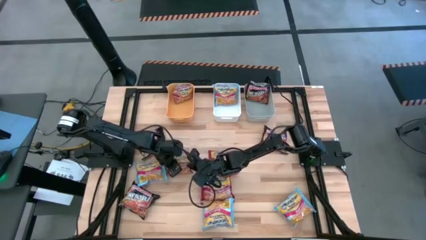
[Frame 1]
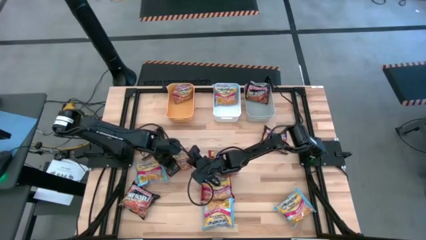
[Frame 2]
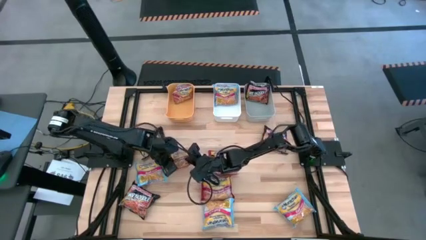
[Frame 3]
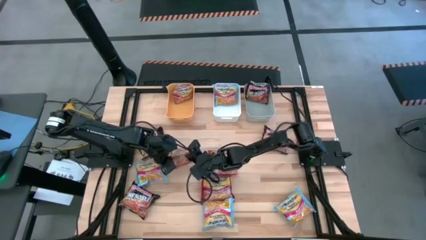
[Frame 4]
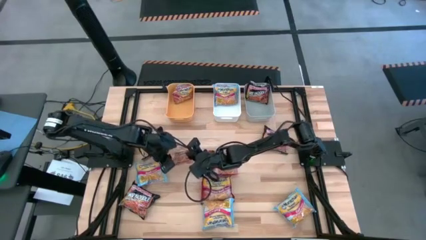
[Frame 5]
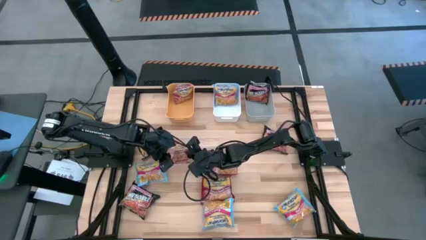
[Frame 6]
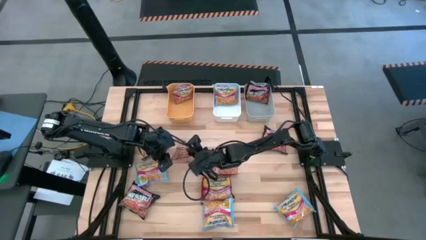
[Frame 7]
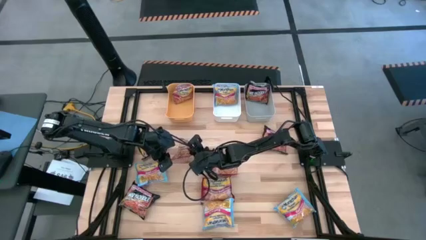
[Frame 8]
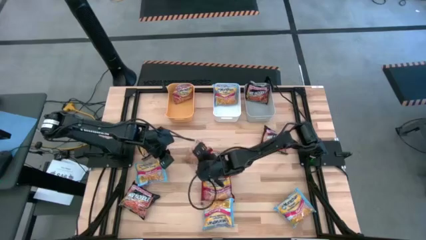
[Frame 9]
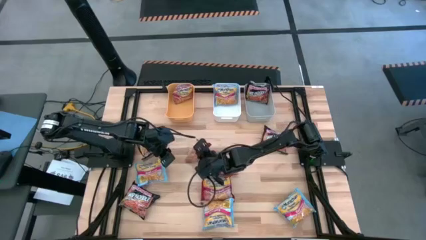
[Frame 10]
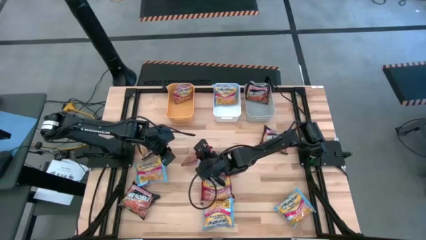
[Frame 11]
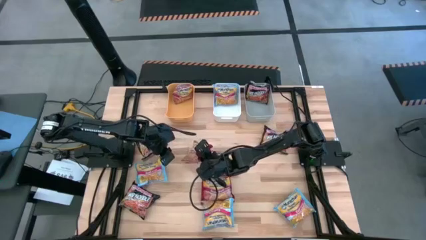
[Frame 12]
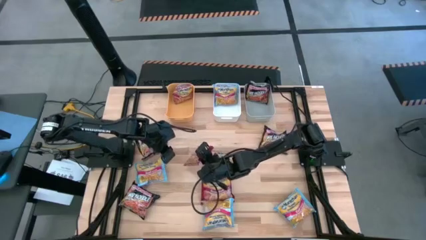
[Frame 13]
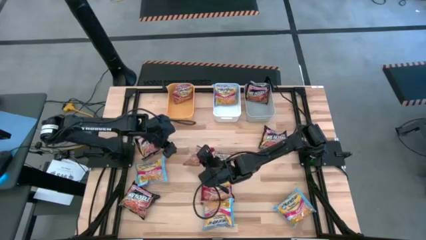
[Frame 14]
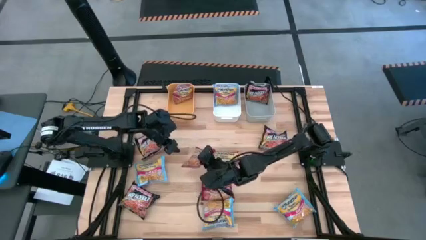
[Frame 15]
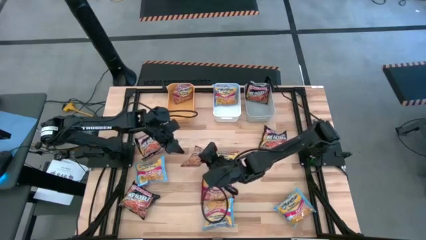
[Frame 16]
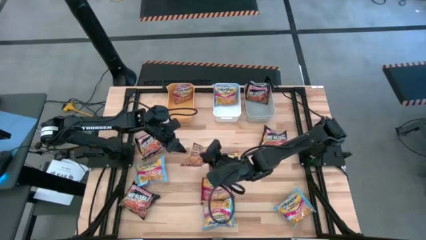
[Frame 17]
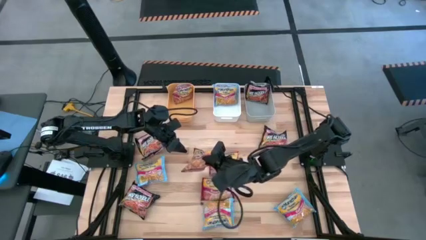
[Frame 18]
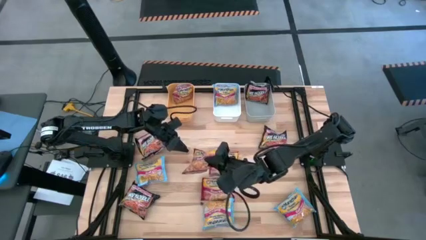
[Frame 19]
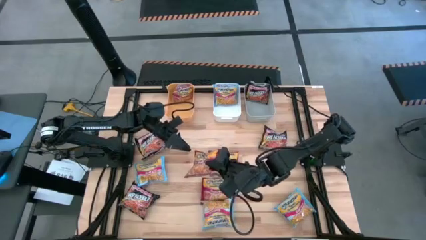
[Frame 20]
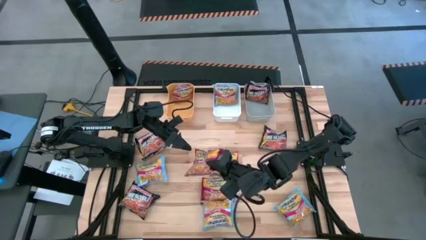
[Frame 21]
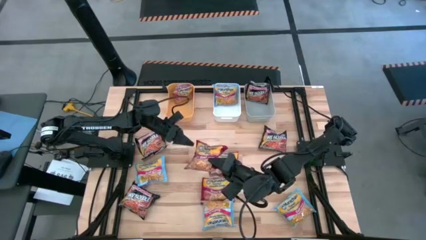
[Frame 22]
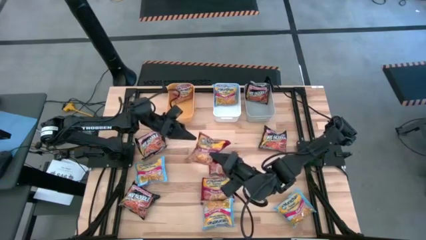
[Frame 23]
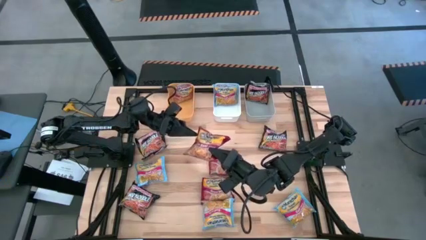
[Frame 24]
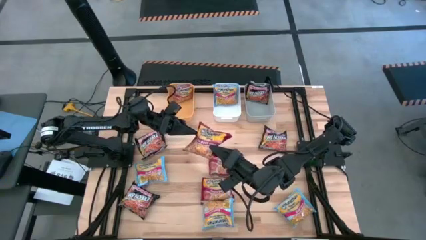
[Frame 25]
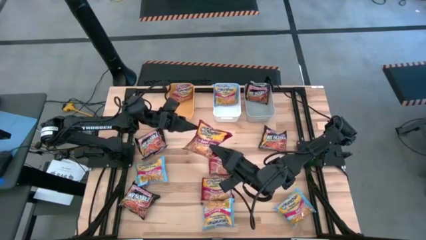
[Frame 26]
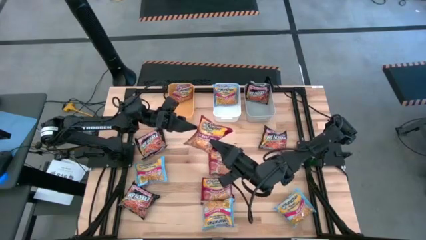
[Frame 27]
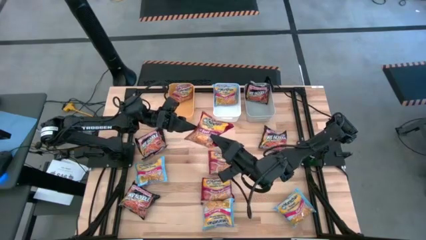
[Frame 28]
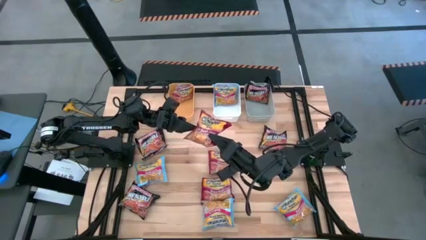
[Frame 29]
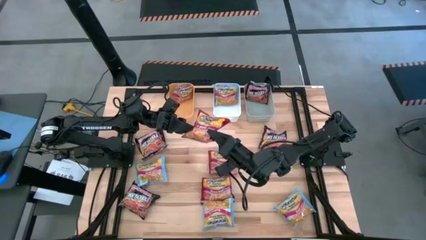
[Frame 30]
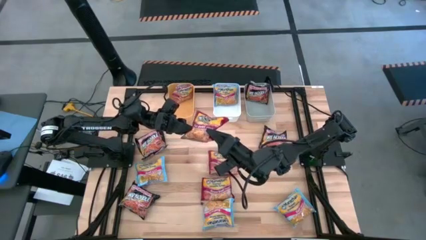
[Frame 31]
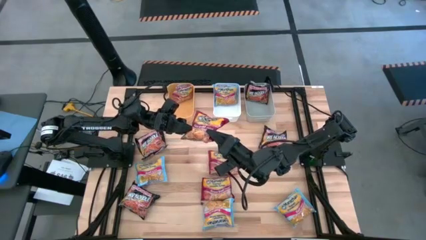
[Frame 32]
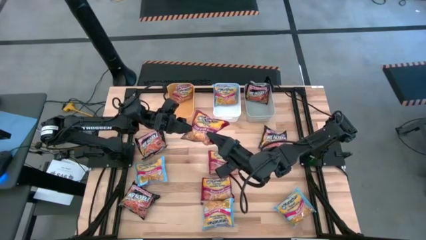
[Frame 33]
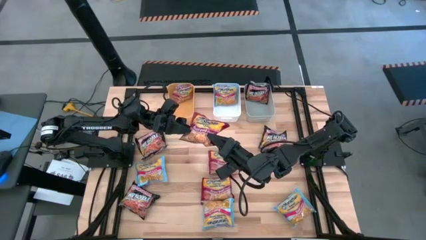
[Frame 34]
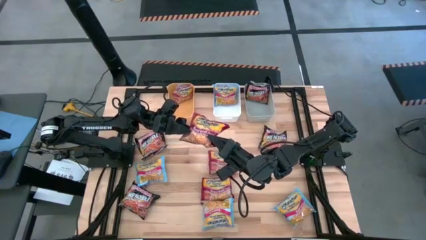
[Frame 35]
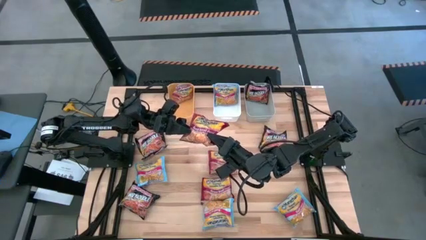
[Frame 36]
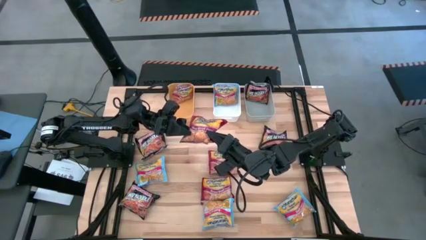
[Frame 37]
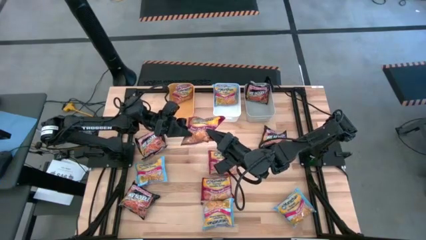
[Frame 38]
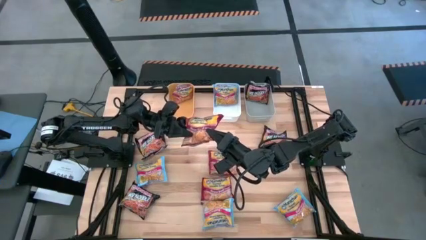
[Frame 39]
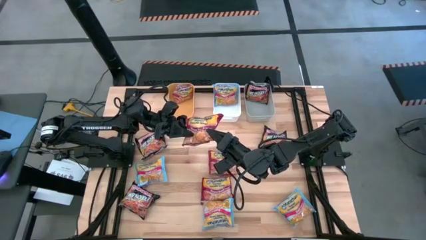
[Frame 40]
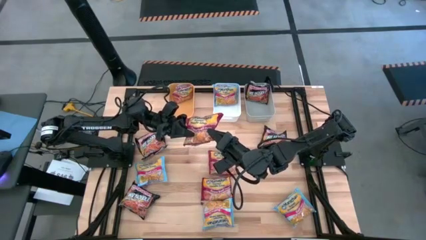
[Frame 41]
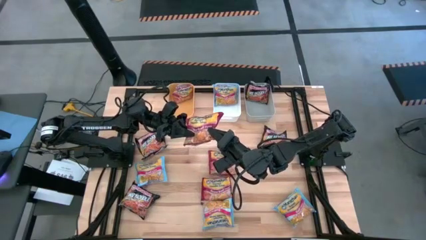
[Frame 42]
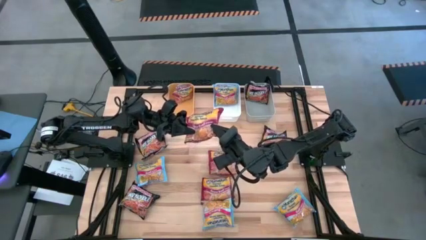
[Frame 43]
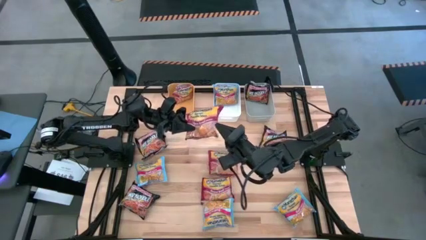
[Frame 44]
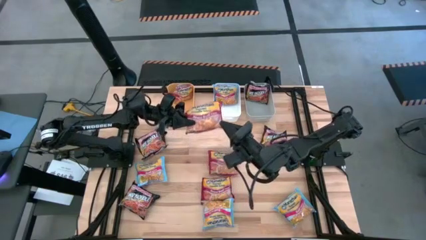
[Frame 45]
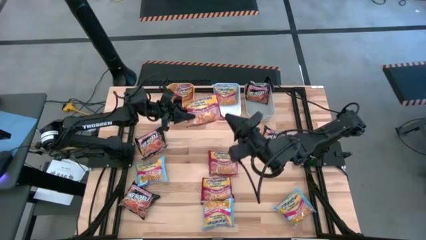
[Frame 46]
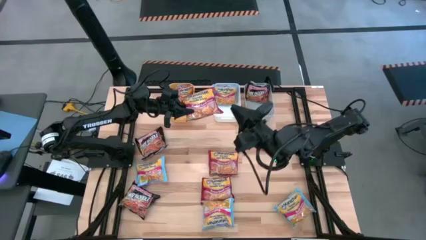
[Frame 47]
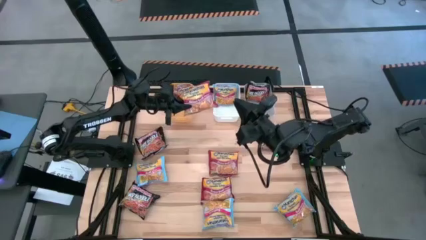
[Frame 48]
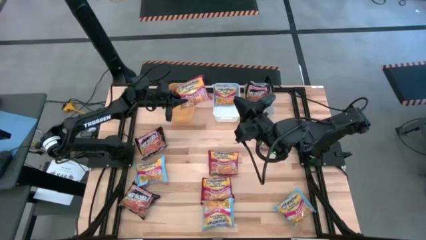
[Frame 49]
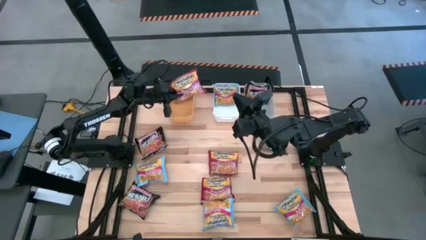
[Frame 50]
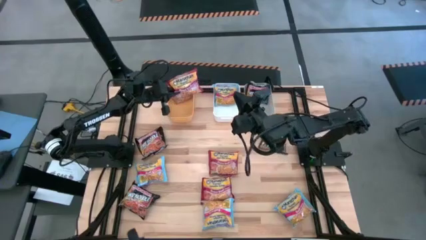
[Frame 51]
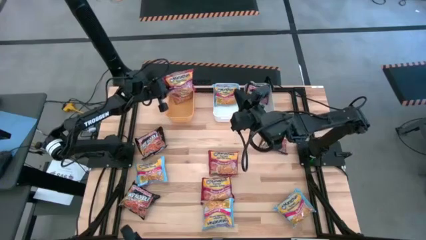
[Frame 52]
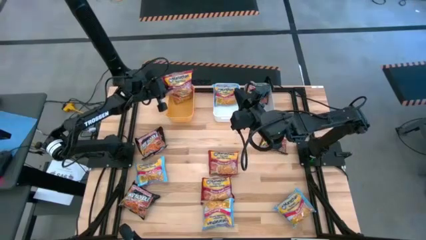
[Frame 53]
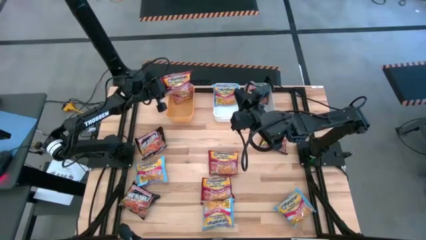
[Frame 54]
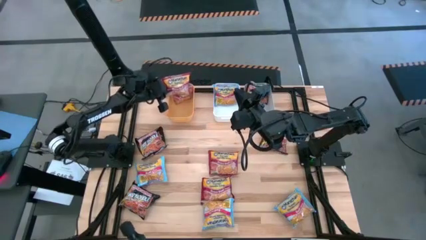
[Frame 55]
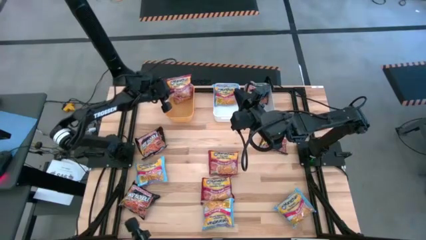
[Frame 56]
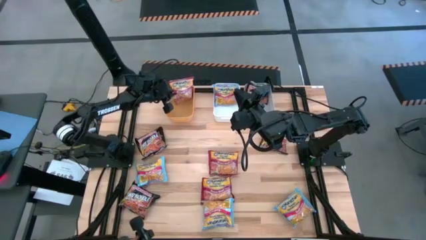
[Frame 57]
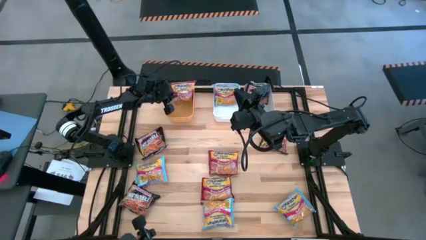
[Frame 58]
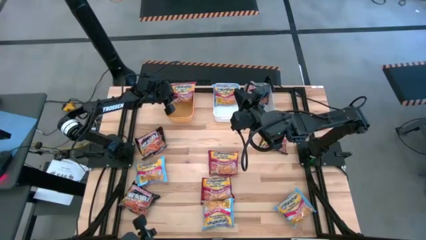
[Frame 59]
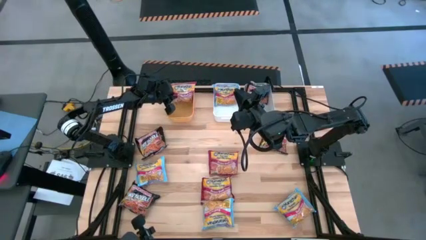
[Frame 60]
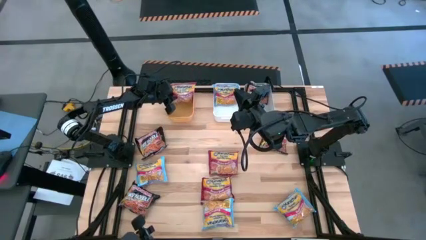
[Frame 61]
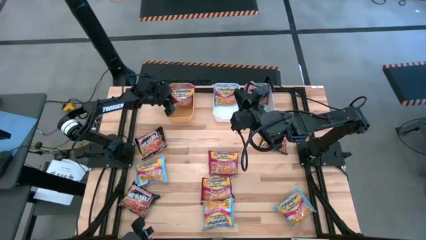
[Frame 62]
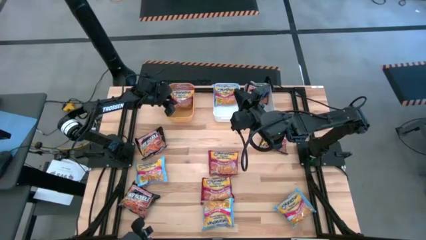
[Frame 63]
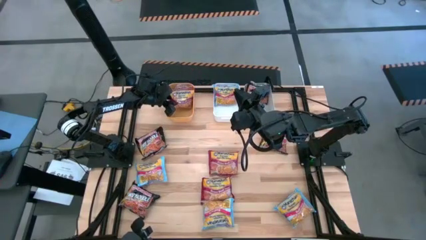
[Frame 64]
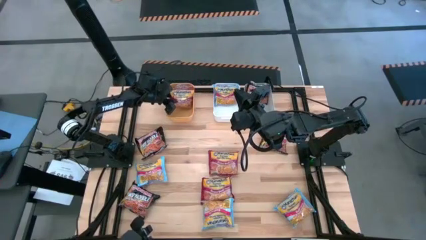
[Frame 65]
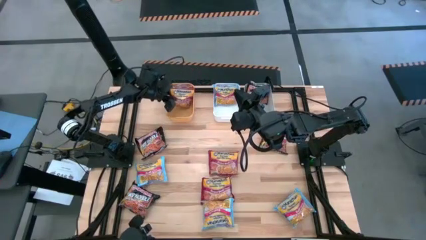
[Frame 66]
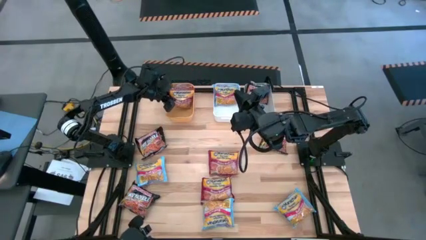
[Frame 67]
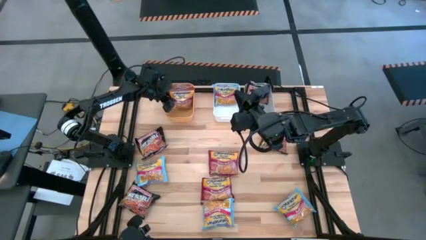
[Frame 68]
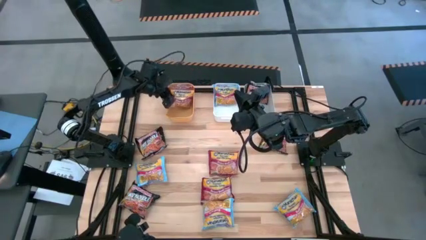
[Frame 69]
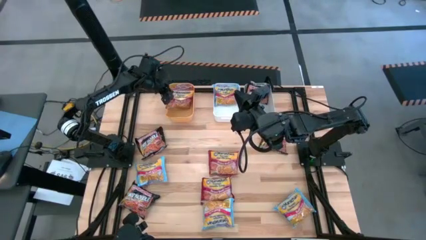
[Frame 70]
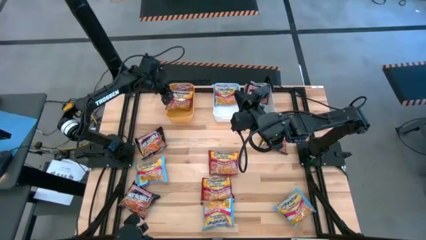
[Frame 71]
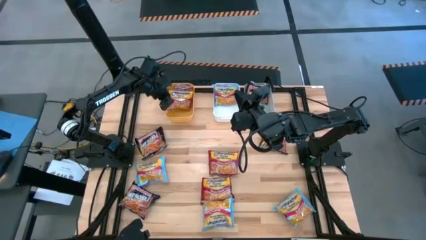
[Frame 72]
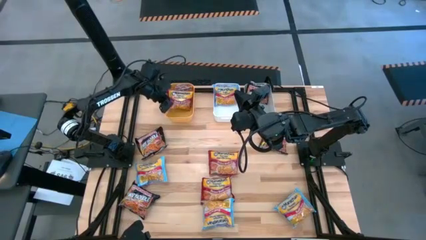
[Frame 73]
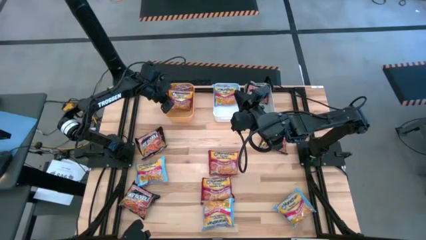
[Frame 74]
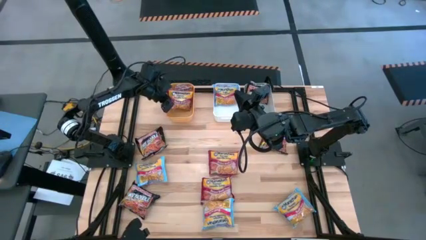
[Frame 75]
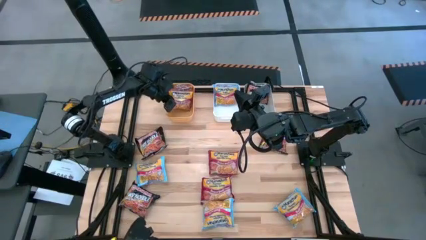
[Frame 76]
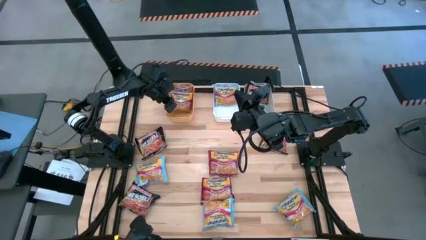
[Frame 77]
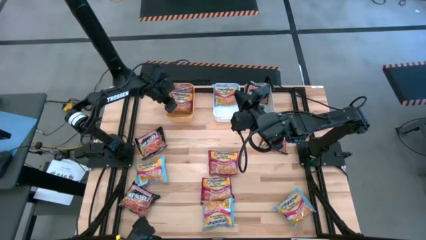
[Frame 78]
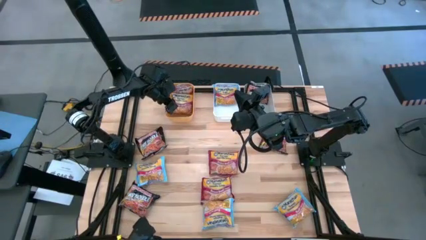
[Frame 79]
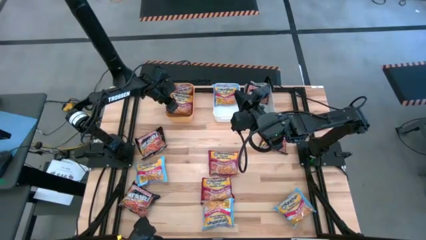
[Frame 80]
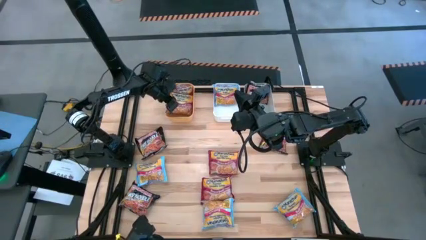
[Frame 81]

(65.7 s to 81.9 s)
Task: Sort Maruchan noodles
Put the red noodle pack into the yellow bin

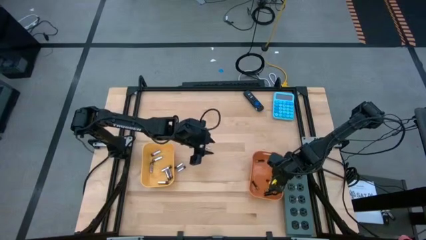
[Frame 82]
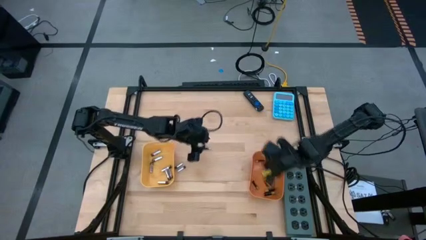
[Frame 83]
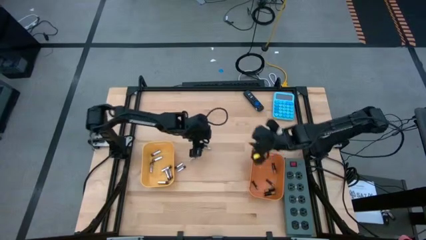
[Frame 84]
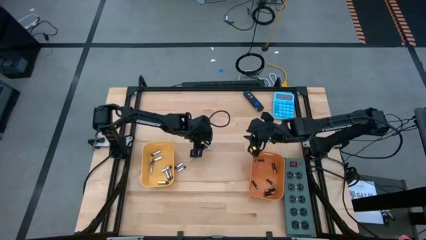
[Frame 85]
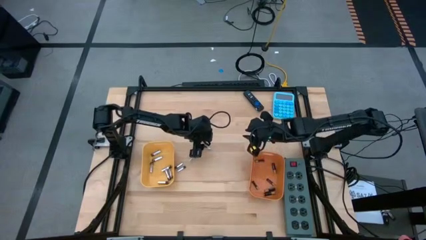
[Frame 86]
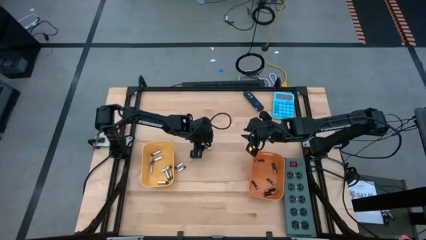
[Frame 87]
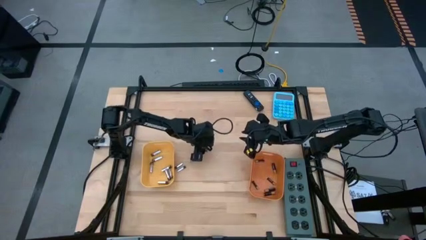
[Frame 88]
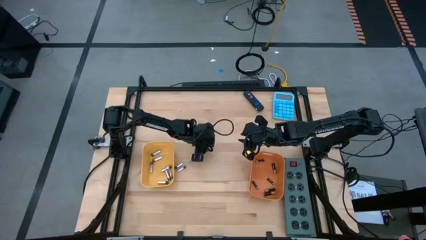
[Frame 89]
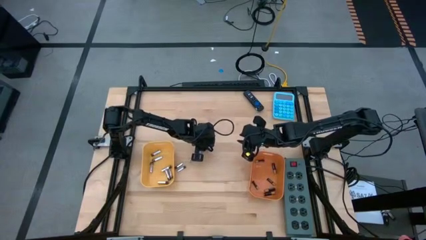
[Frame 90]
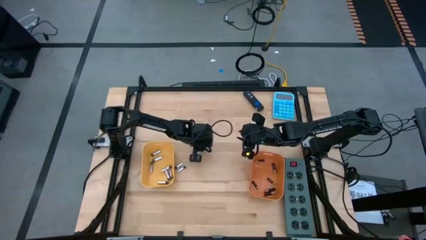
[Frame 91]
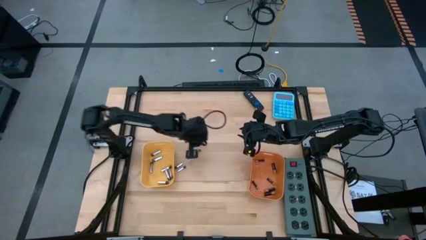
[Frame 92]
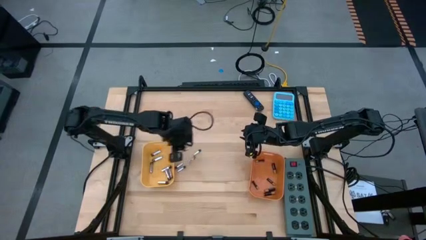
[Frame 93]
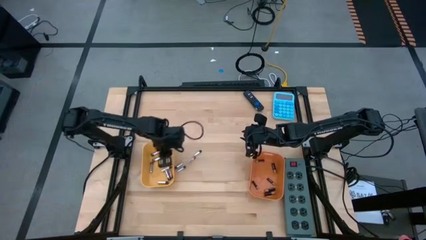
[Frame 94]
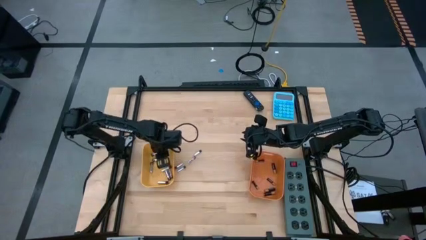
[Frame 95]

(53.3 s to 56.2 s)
Task: Sort batteries
Put the silver battery into the yellow bin
